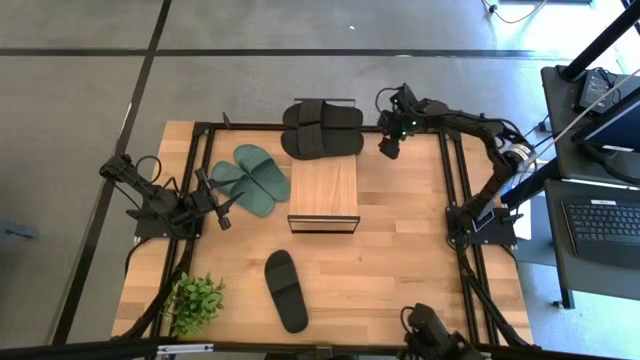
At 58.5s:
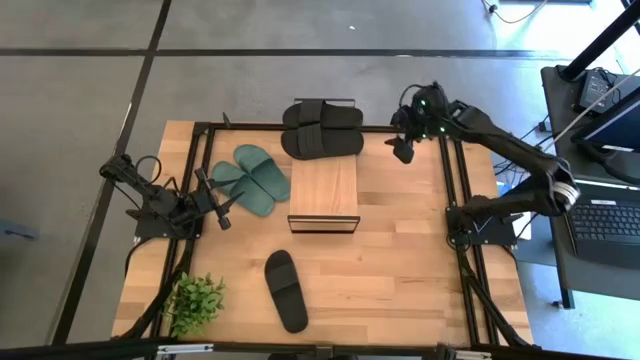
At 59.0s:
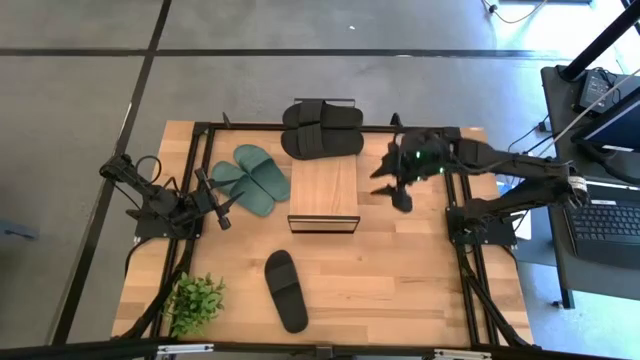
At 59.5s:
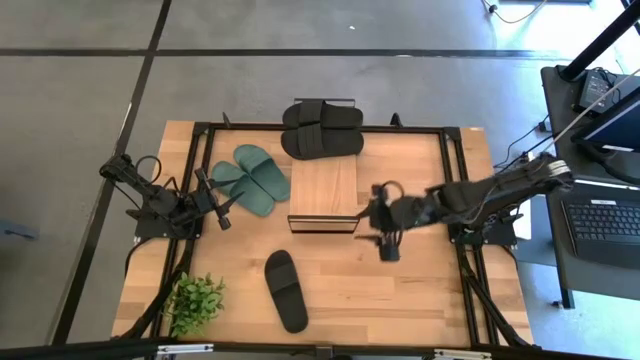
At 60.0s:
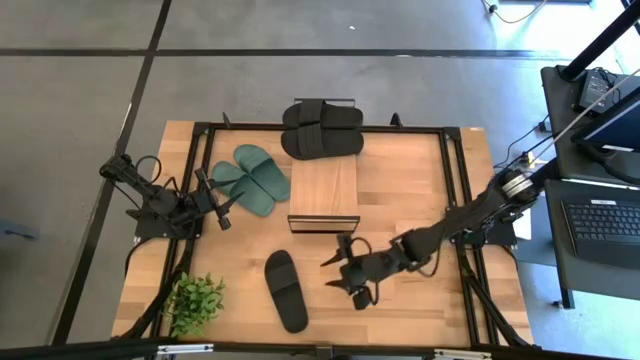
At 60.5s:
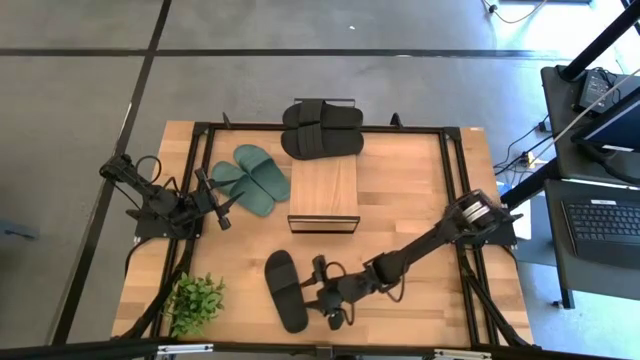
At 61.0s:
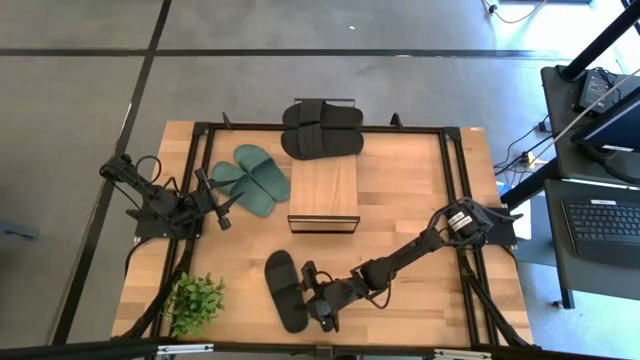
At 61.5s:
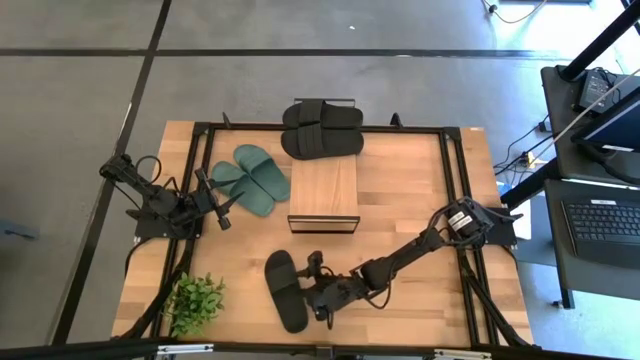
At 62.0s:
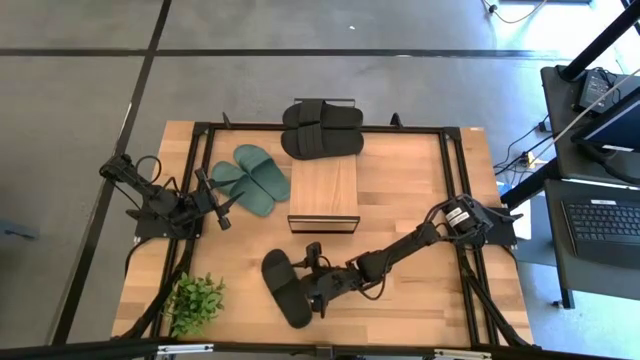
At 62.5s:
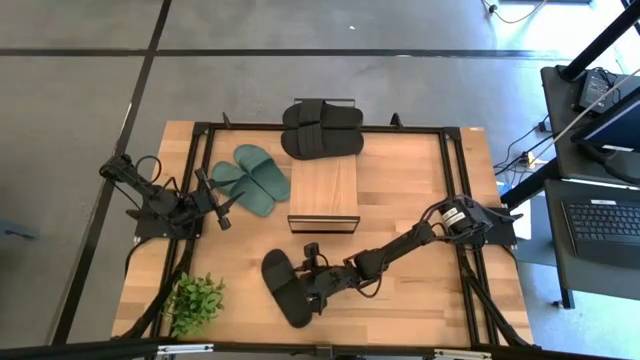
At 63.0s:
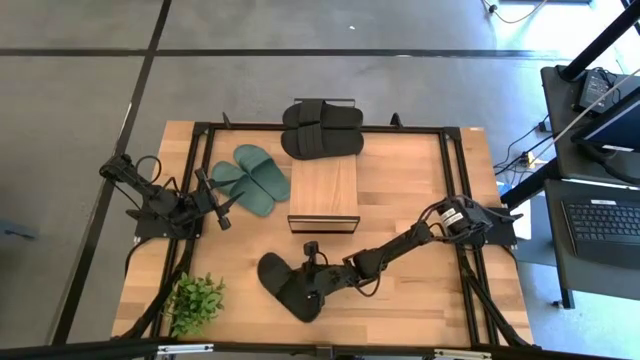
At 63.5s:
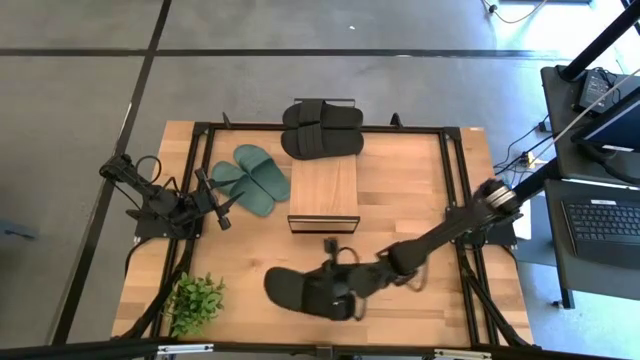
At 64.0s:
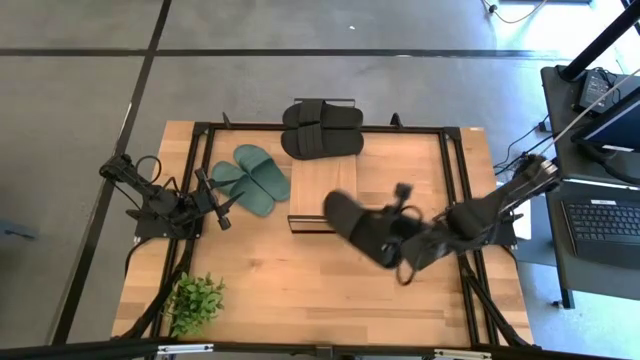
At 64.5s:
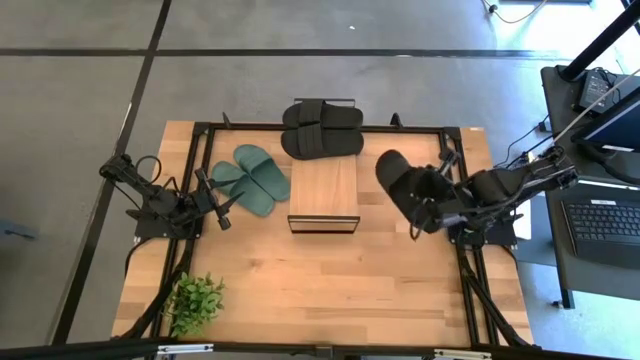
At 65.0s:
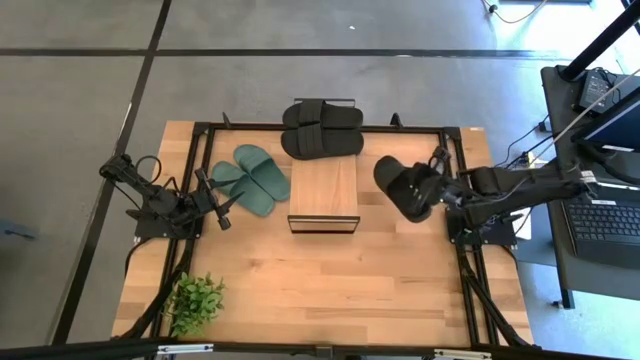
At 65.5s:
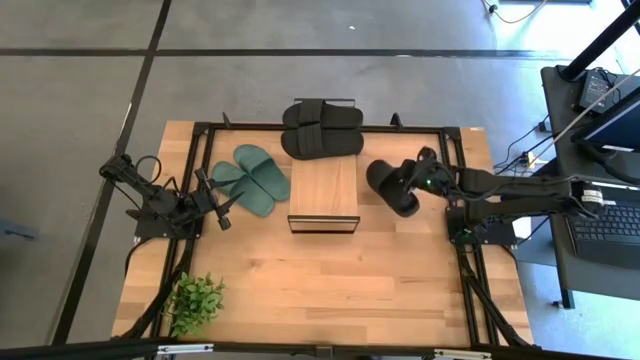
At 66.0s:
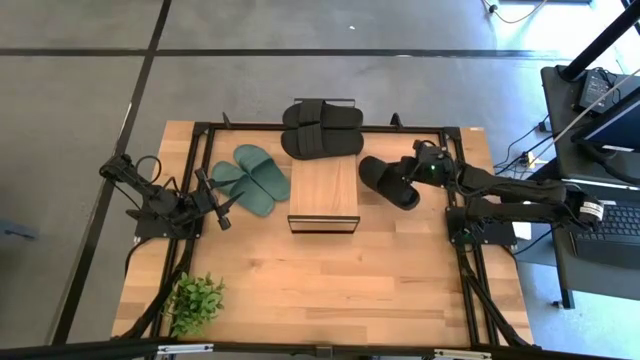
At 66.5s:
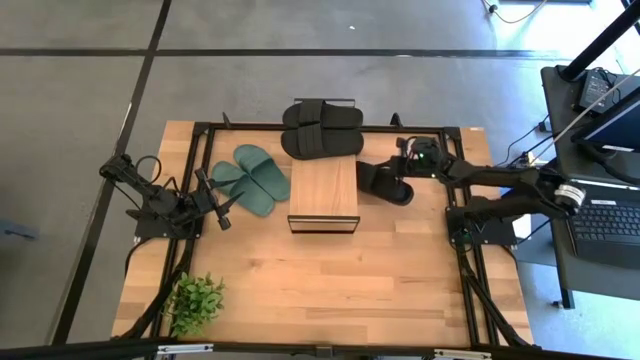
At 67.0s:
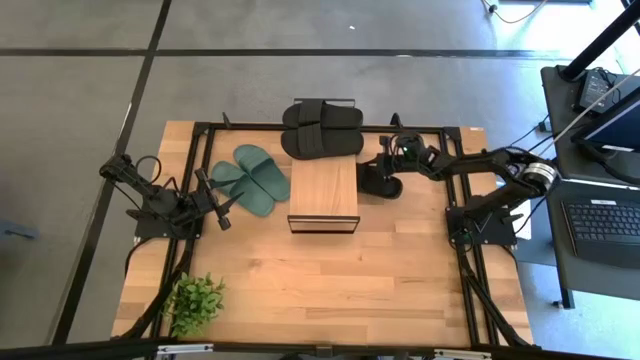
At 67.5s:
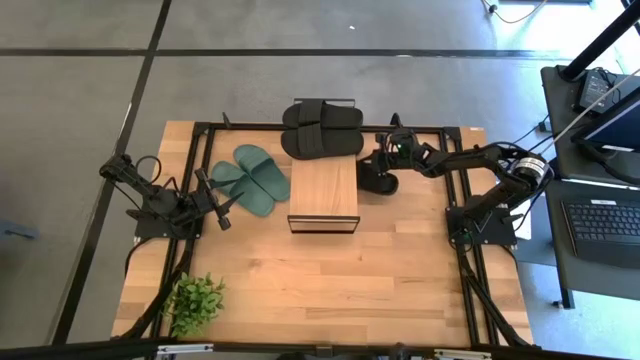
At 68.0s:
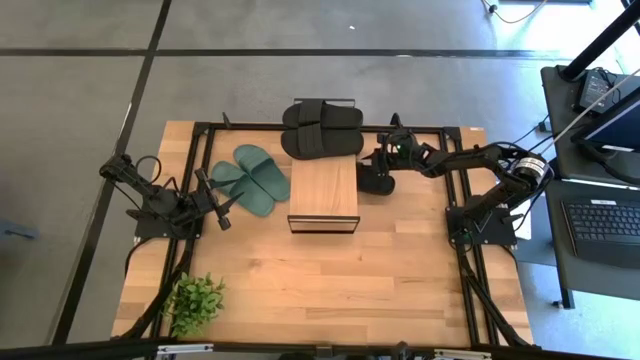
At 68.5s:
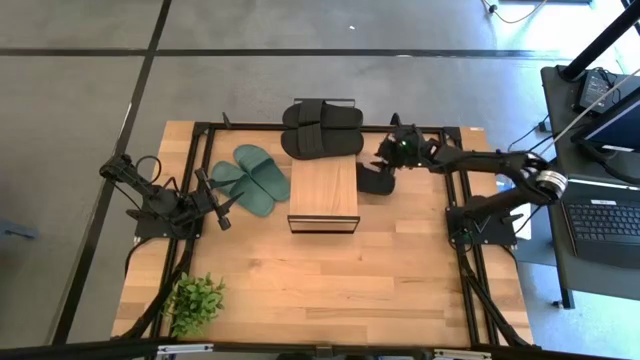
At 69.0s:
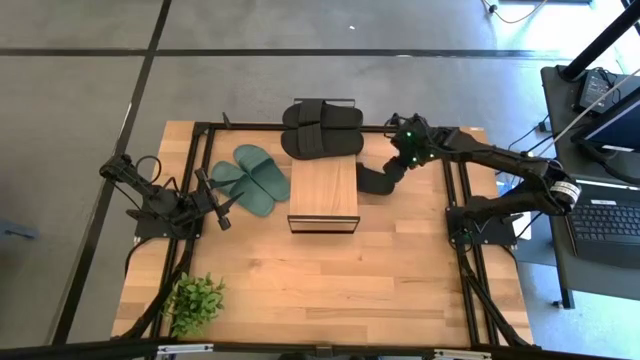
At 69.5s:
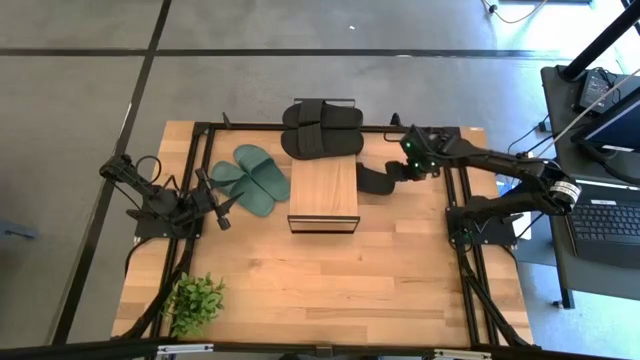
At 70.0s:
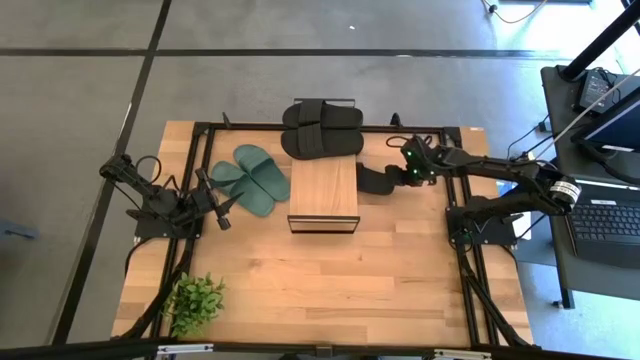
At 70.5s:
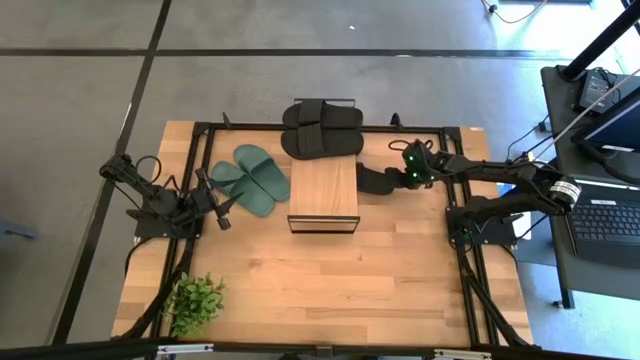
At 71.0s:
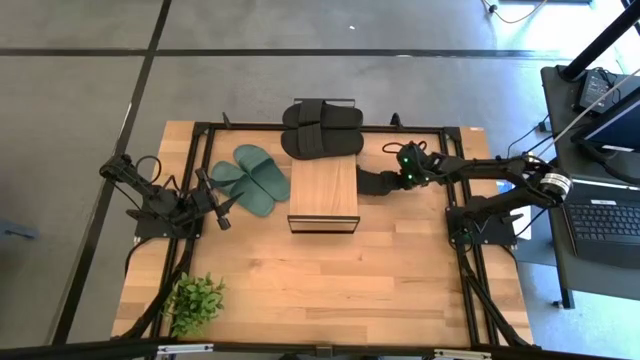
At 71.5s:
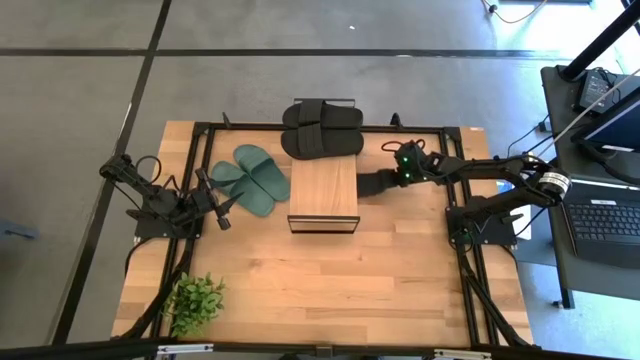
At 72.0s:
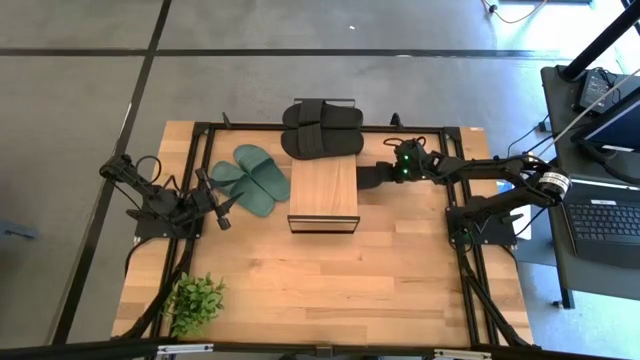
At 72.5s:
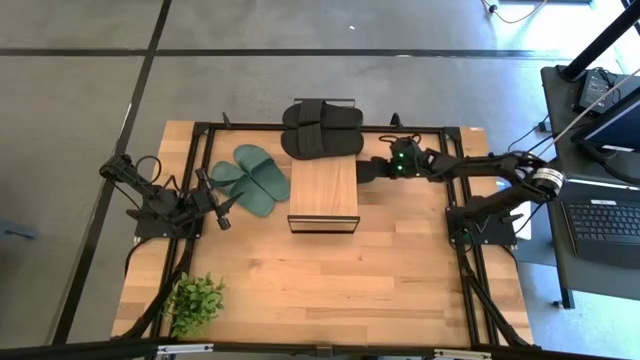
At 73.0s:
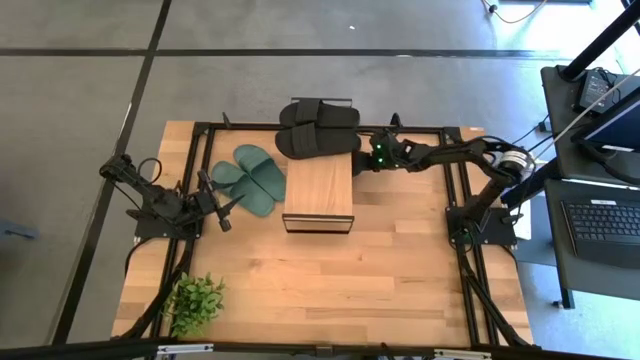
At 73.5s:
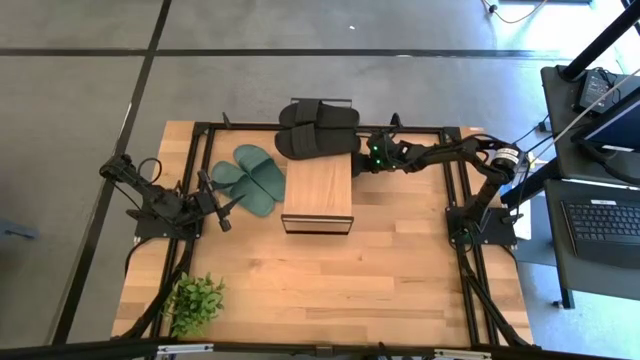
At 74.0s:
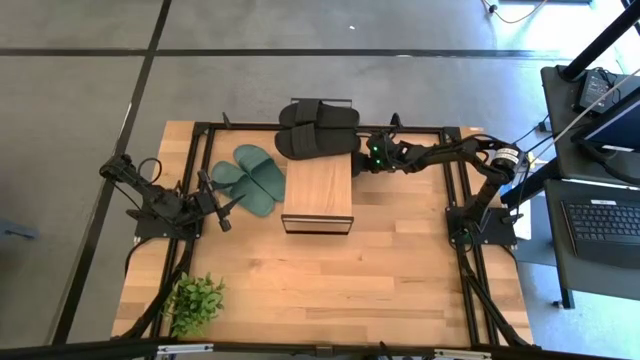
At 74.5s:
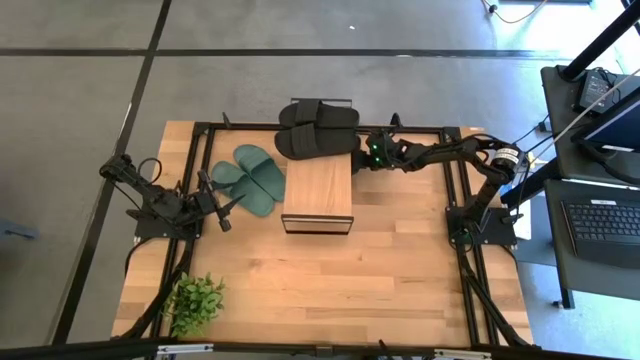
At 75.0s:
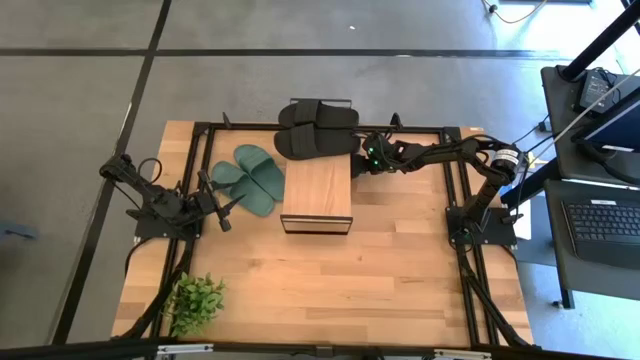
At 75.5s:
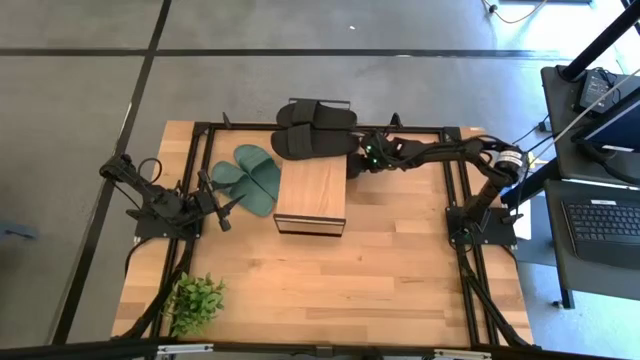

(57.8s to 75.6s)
Task: Pick and place slides into the shelf
Put the black slide under the shelf
